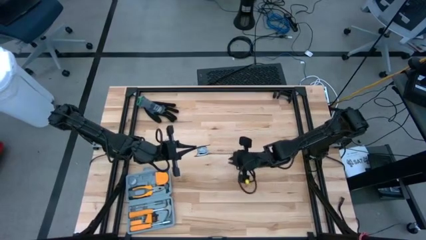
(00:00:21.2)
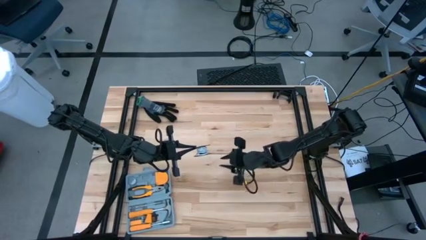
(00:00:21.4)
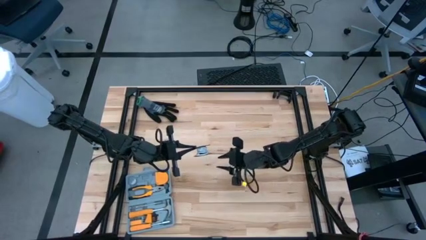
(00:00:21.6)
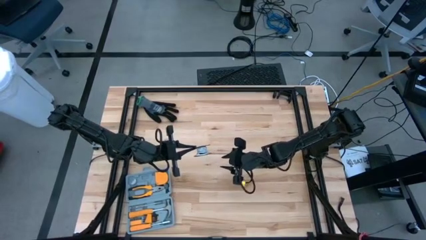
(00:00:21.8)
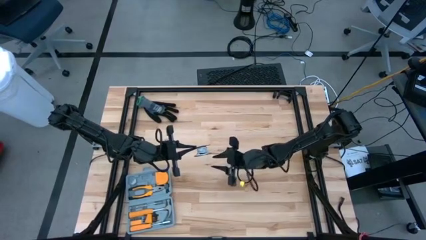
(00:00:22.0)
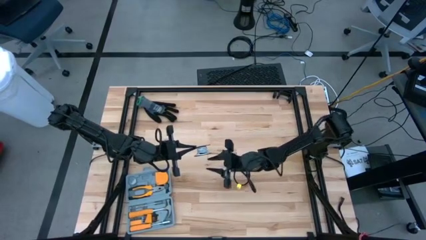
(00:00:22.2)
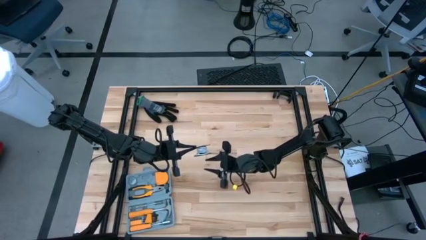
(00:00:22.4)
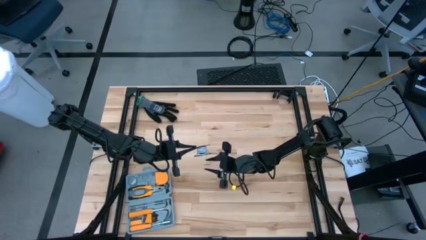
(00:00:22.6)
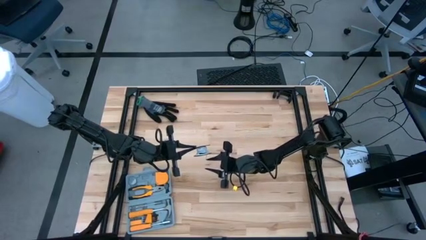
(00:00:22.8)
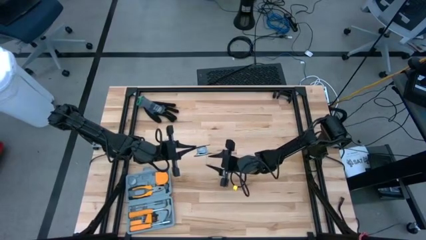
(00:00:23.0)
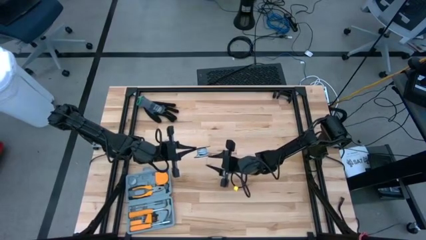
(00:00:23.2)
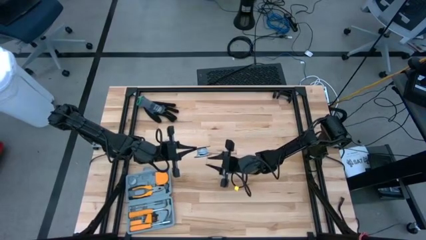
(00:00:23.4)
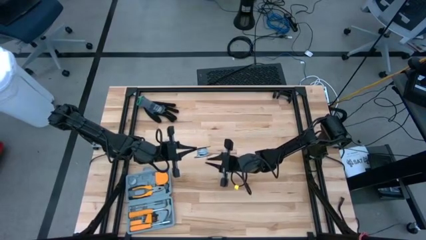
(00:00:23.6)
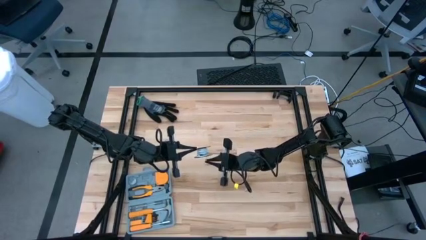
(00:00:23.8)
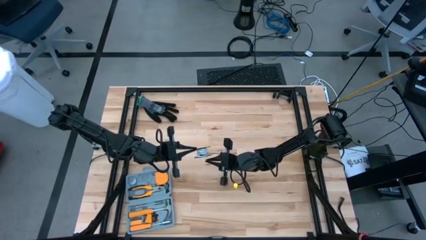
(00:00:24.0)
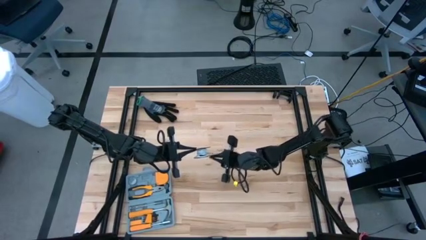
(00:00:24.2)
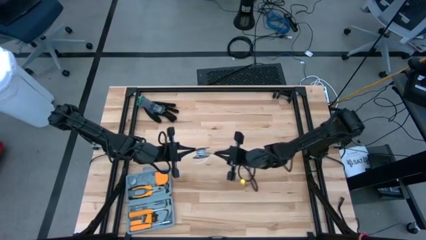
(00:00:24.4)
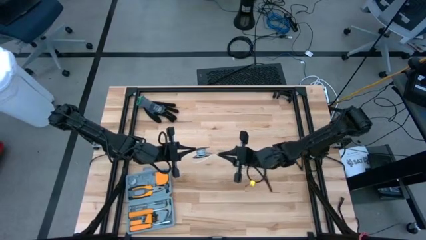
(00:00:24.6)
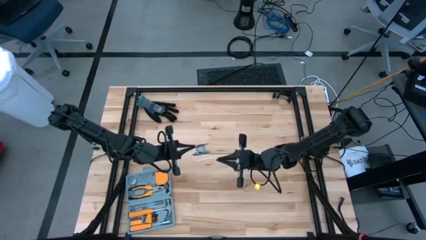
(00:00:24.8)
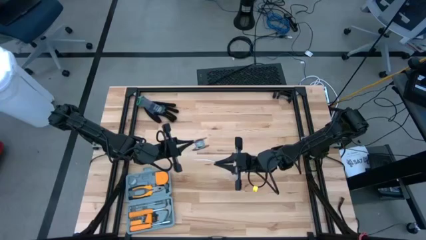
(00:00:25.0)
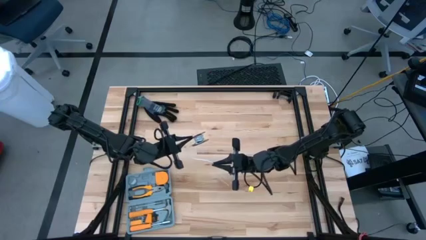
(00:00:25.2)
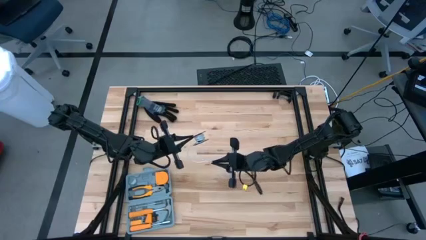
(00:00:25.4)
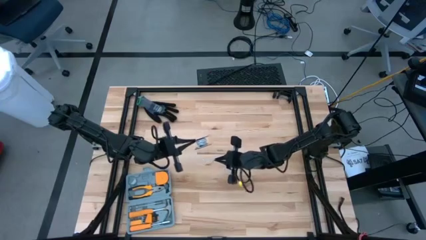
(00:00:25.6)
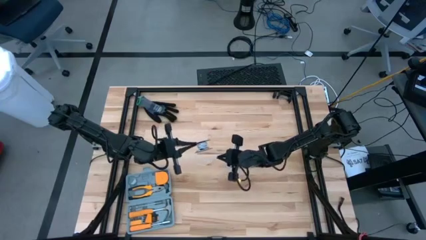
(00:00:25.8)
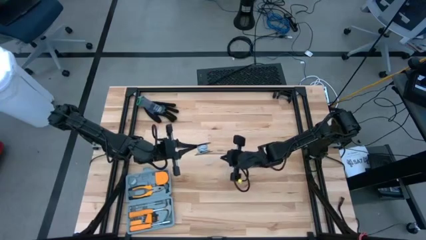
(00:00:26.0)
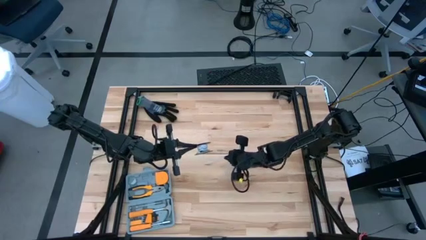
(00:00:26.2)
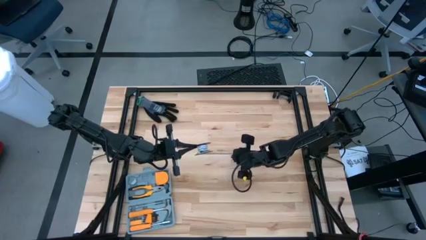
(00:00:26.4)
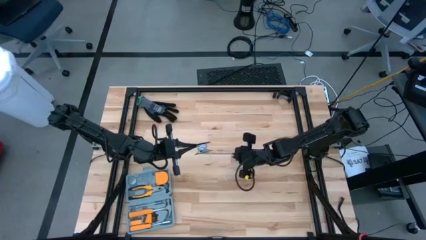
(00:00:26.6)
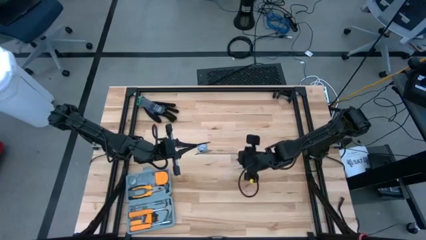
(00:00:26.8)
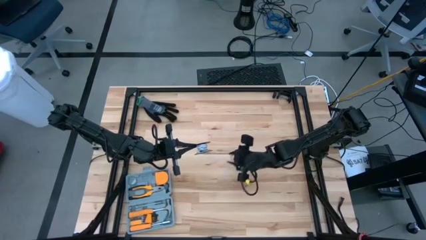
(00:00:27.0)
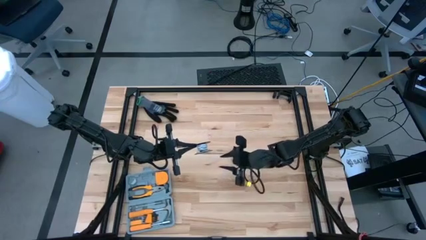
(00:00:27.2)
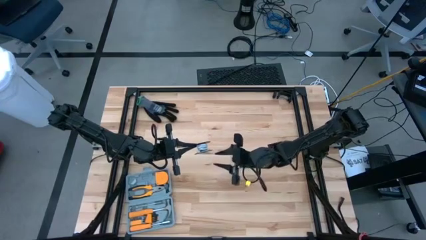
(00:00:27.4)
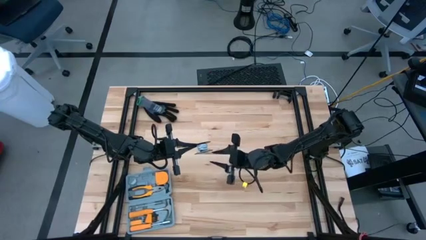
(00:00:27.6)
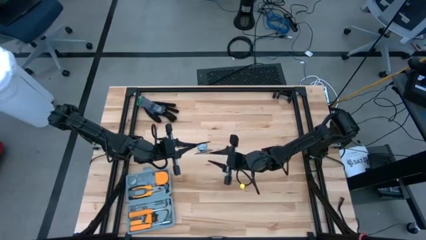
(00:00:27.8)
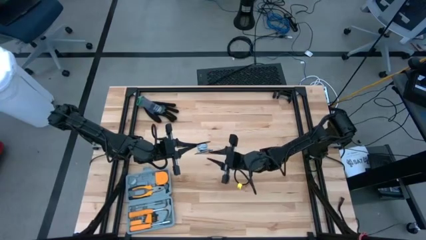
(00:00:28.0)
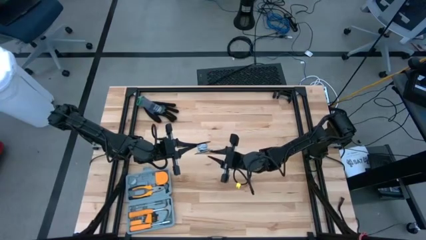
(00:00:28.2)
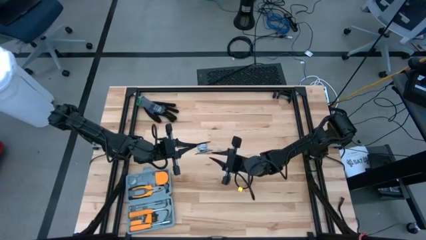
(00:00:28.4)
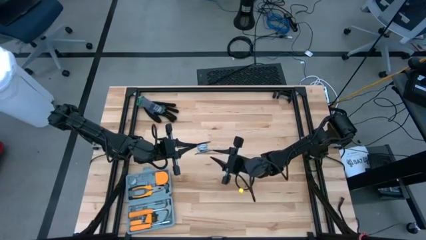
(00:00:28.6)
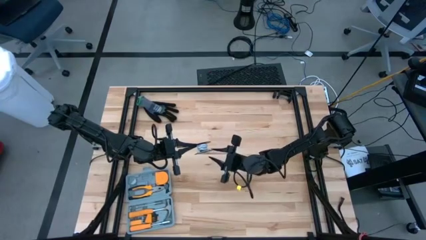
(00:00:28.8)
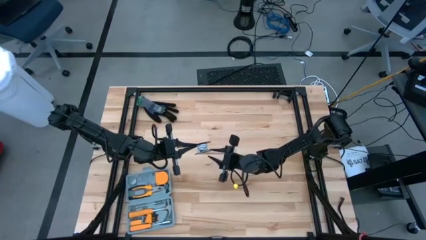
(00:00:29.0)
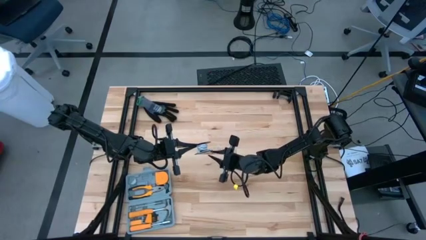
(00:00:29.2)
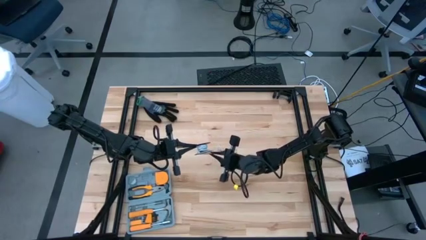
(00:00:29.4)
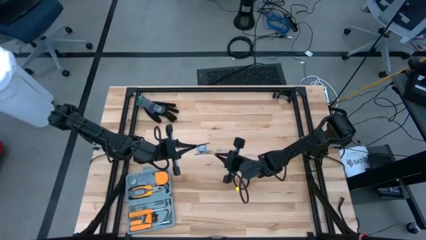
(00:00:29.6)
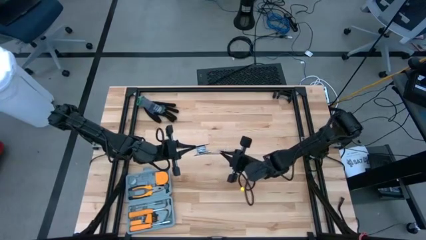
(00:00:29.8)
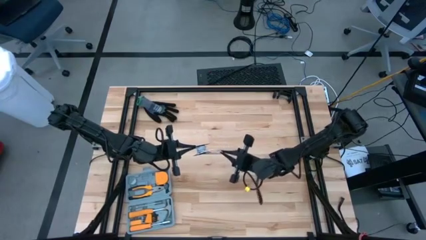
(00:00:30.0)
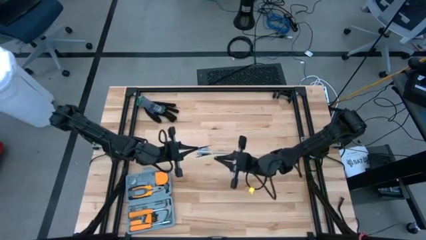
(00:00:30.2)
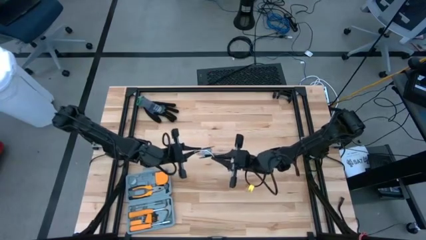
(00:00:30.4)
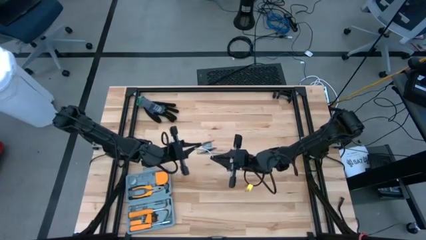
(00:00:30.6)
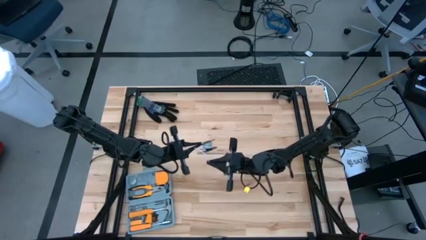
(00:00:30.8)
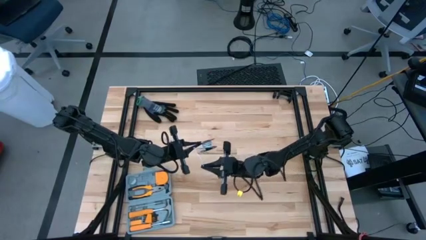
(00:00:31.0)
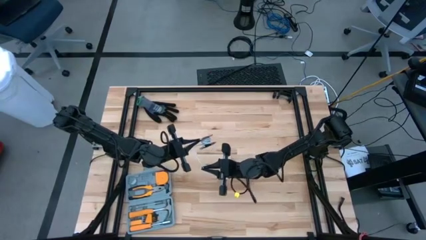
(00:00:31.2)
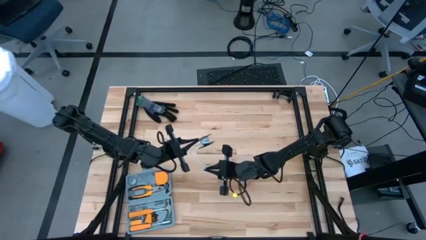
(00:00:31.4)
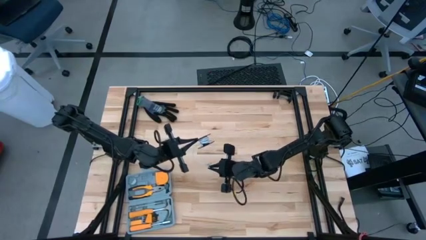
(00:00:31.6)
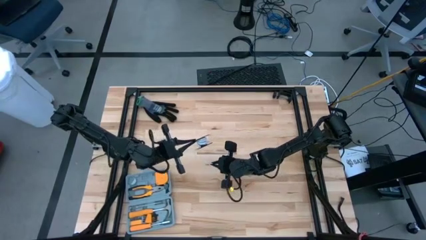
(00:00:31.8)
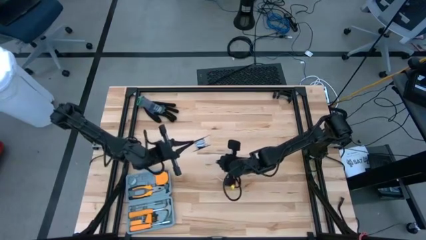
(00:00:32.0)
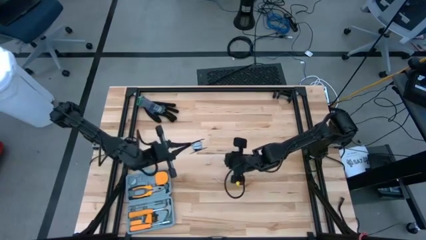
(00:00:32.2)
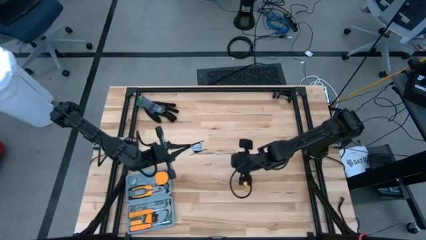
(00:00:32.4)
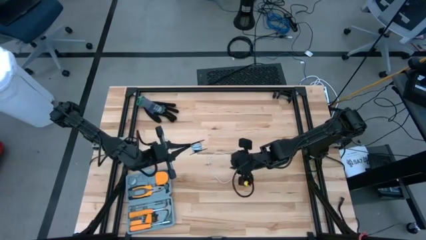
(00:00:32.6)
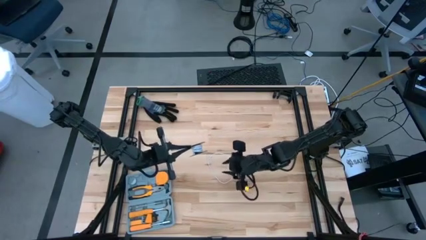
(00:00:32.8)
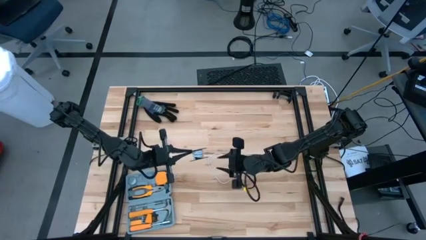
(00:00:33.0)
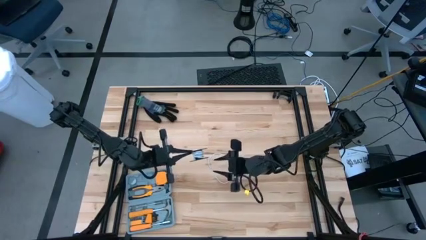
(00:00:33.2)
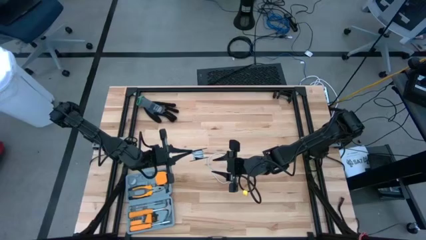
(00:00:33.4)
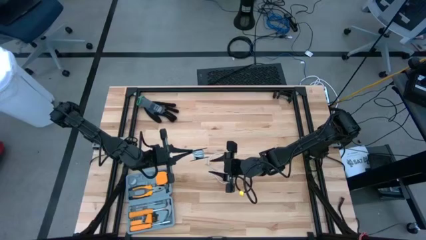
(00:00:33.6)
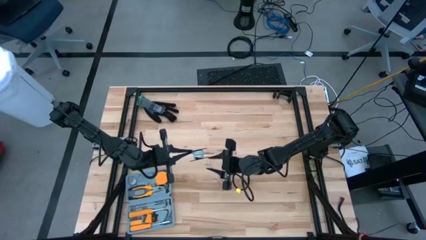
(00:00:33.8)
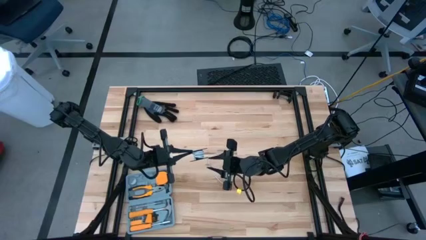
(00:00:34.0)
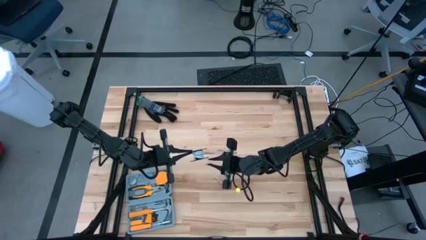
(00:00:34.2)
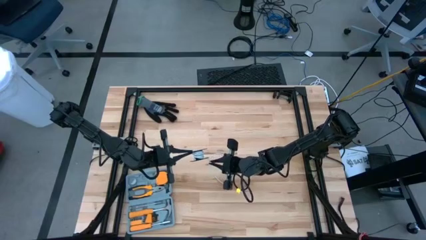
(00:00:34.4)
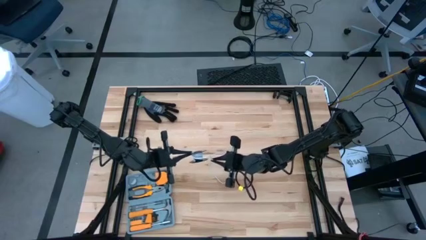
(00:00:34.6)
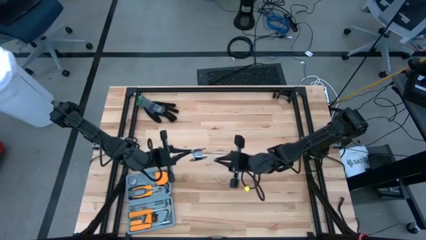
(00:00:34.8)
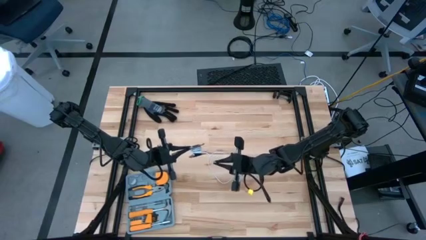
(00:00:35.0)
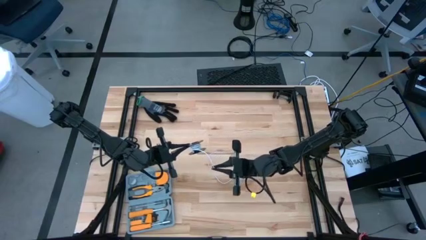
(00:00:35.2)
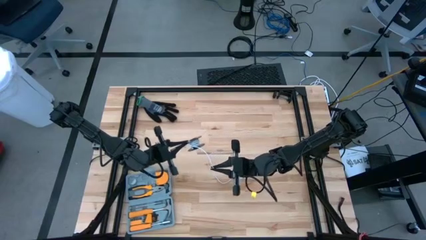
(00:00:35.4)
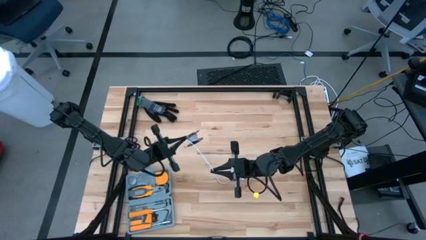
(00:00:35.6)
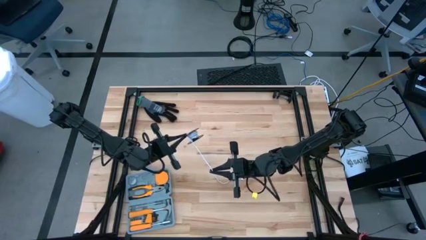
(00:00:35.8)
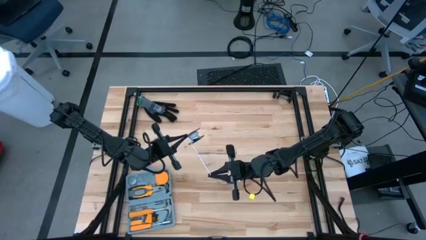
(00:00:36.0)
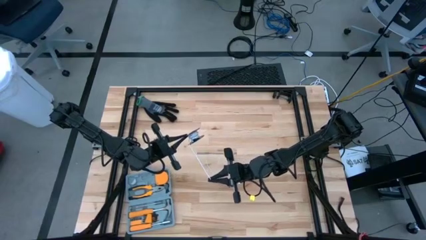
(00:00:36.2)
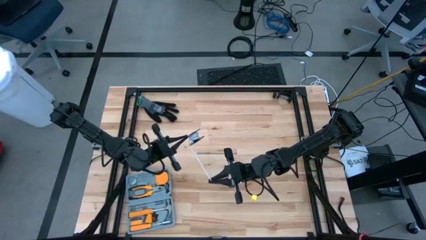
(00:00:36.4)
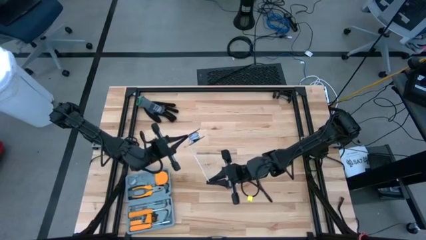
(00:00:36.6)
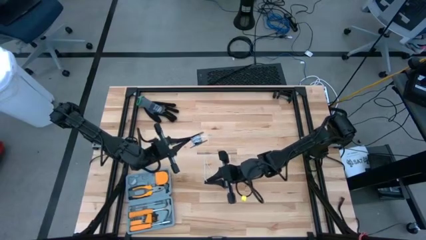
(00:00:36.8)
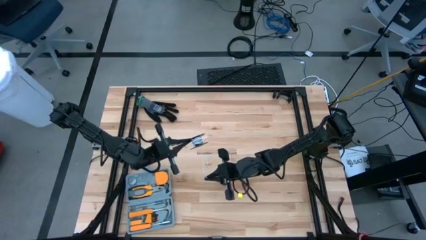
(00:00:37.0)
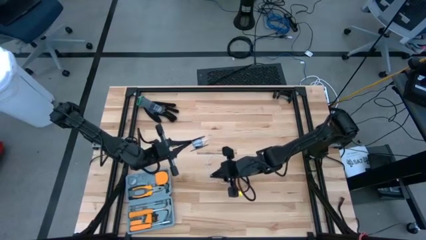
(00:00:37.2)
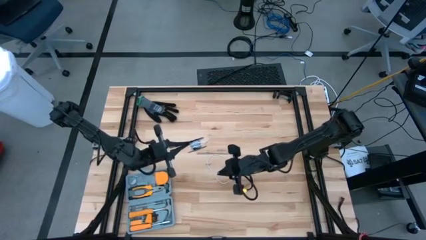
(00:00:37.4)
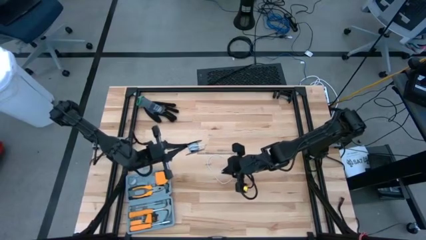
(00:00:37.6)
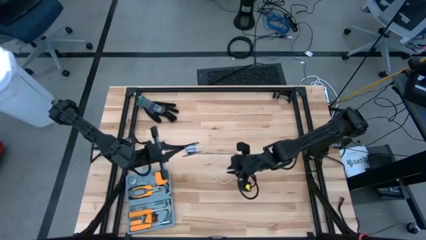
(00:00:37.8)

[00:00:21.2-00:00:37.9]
Task: Coil cords
Uncoil the white cable wire from the spool
